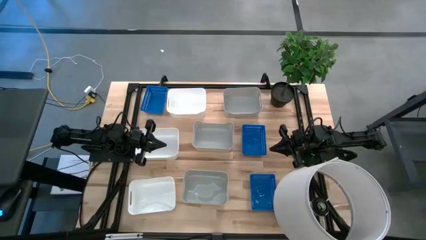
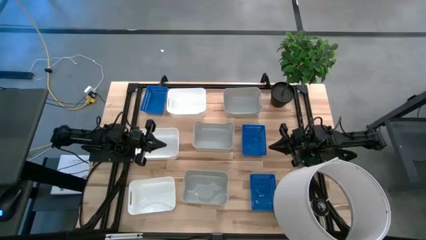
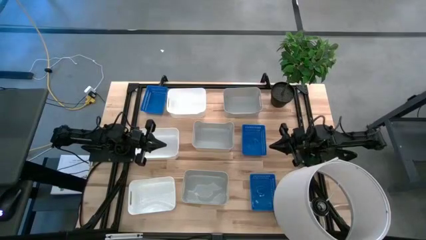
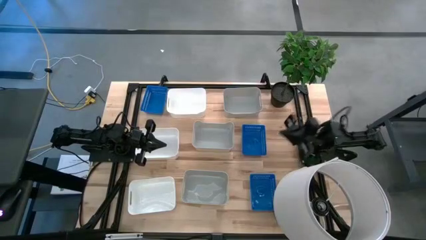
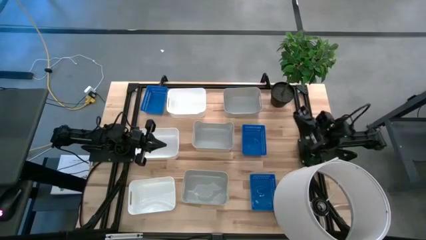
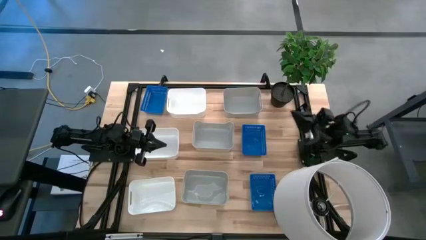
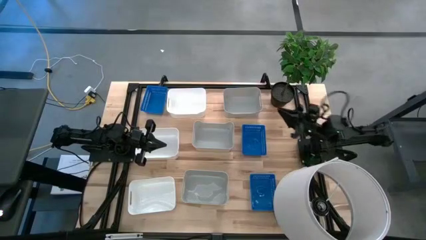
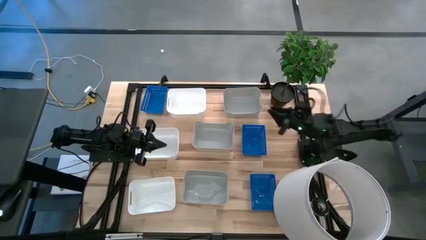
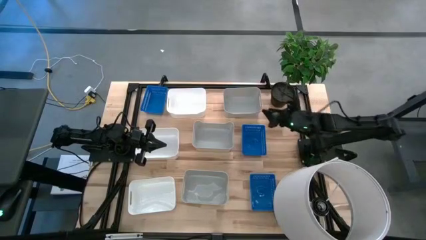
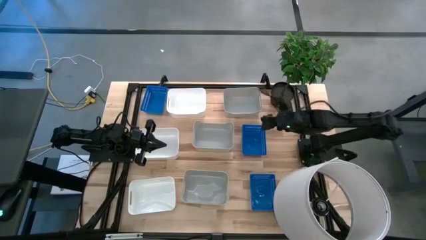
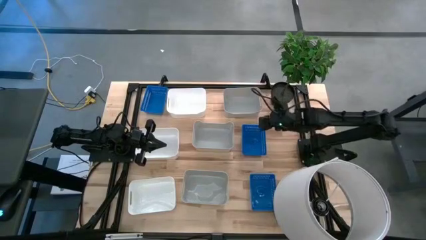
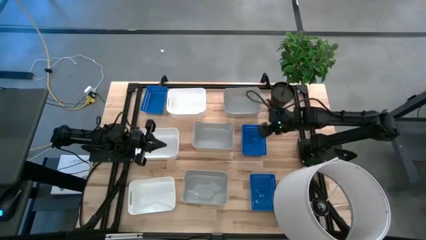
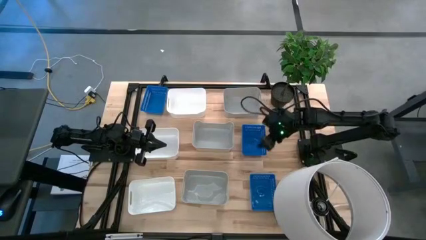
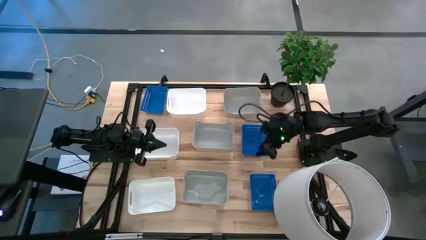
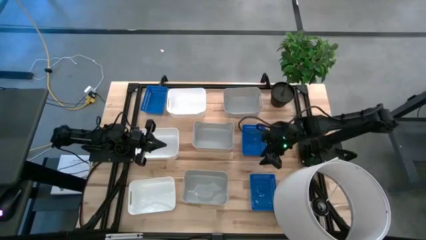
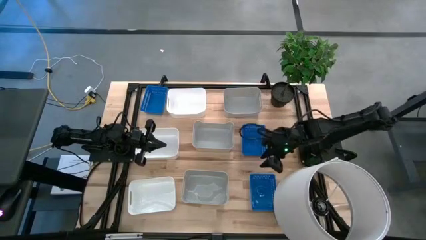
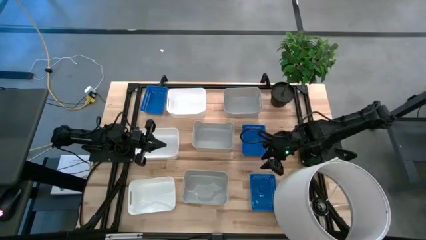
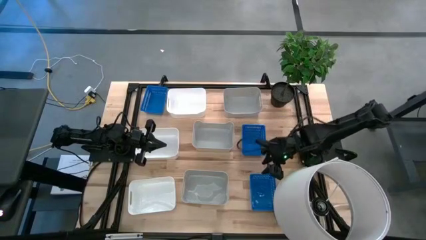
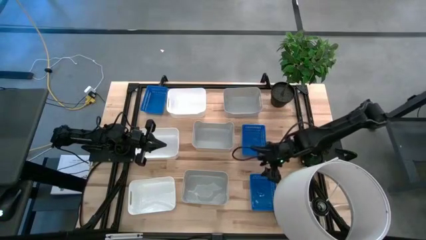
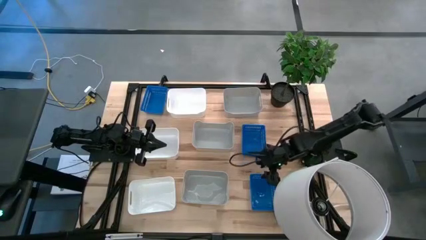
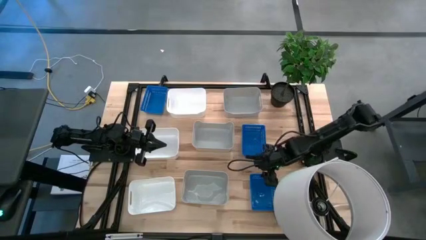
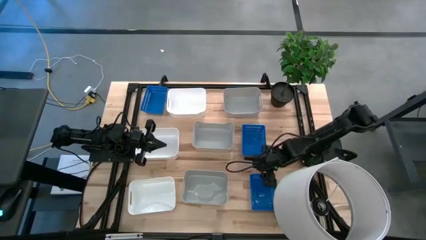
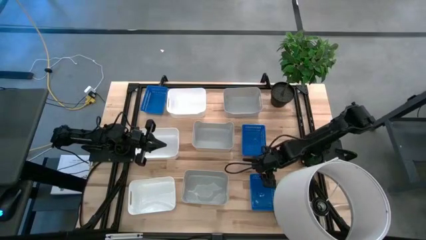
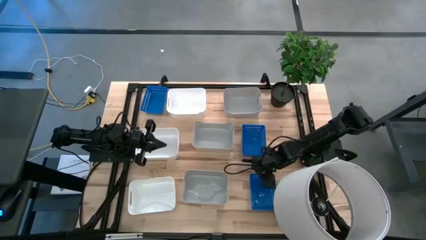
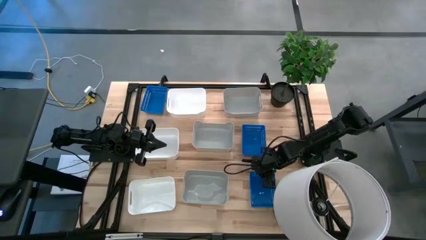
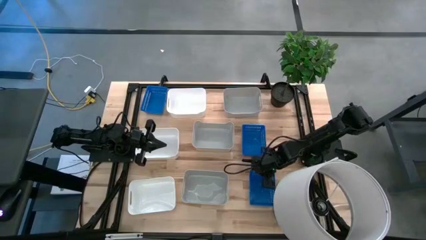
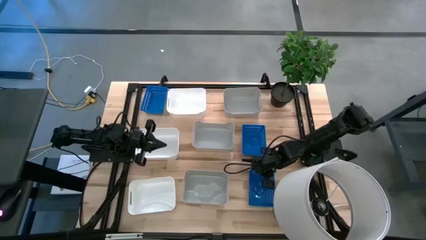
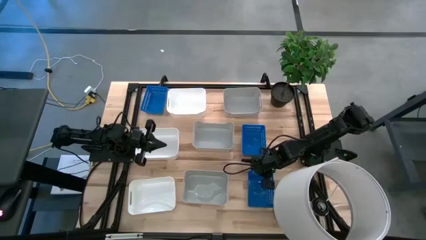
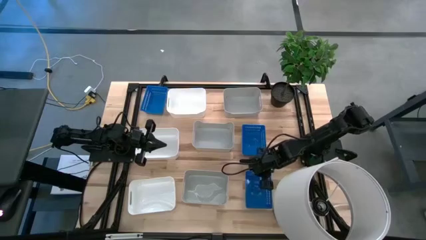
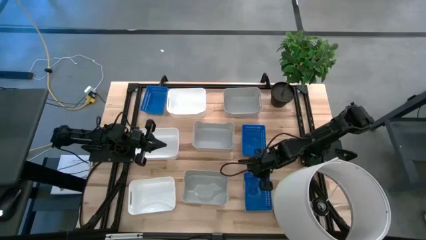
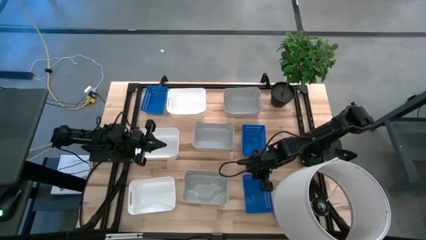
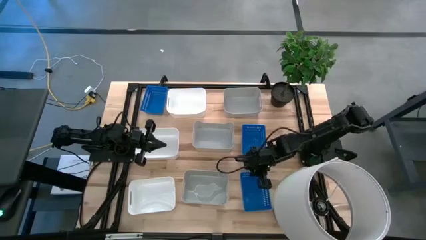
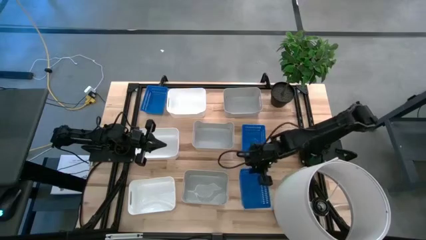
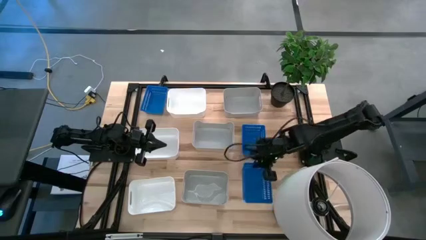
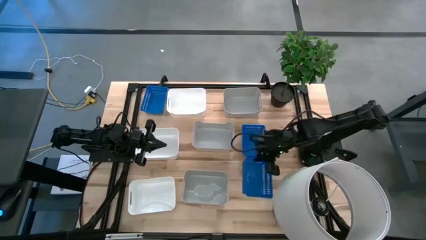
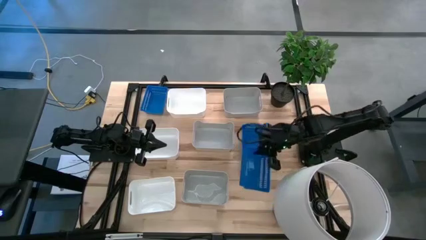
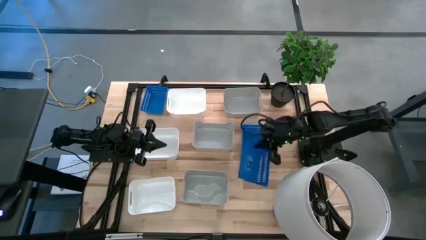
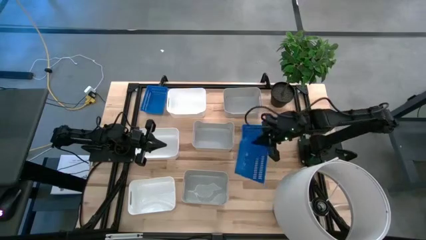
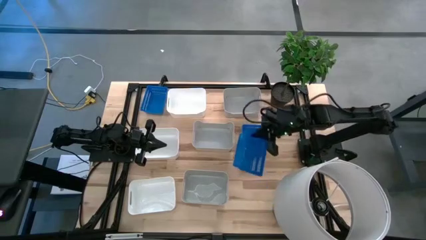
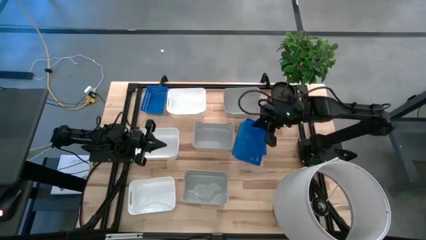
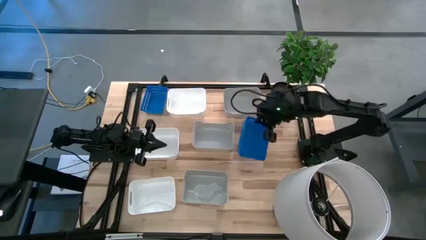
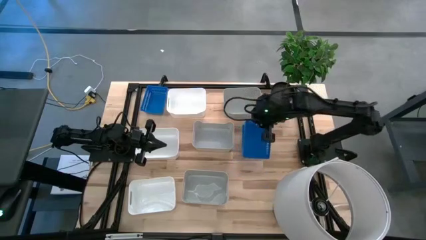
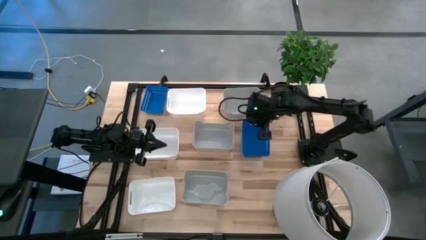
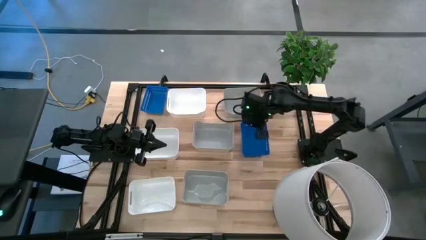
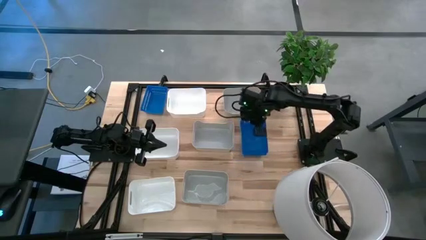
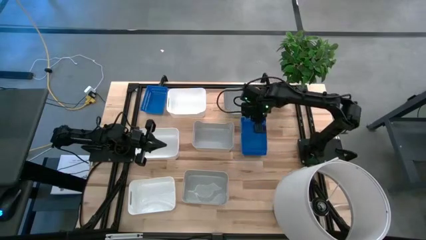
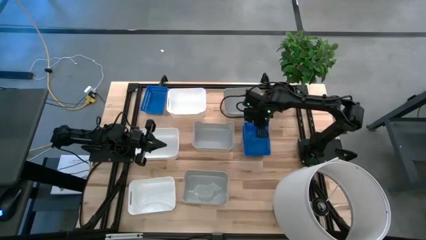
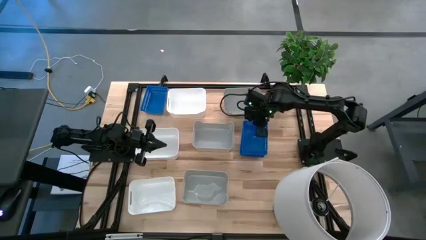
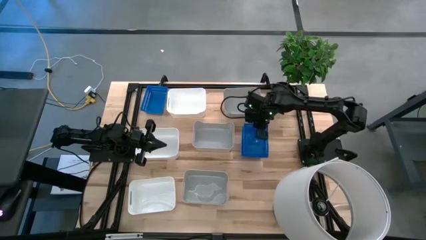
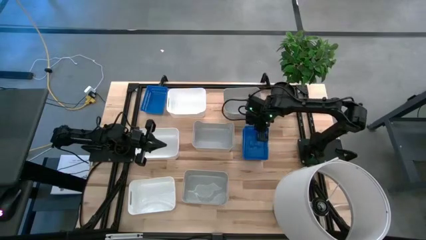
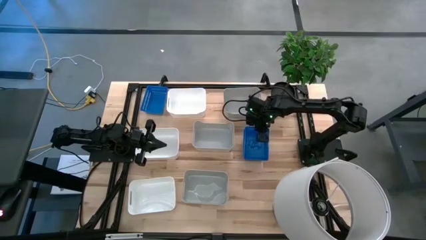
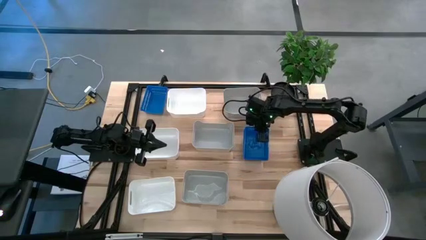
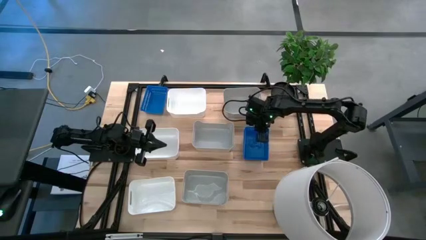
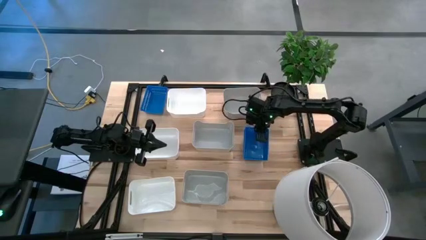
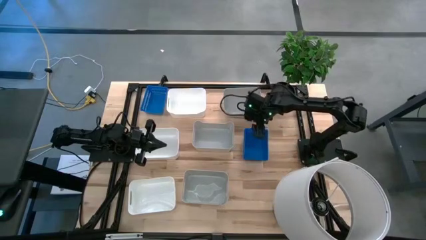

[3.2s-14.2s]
Stack the bottom blue bin into the middle right blue basket
